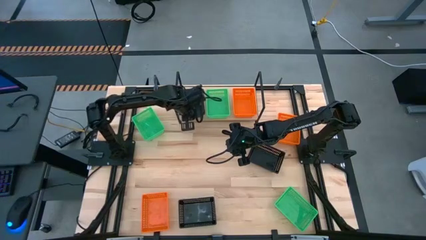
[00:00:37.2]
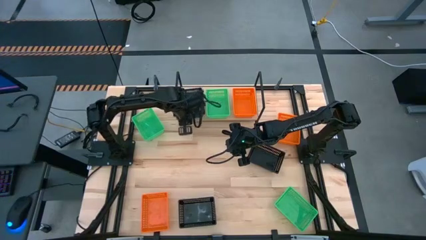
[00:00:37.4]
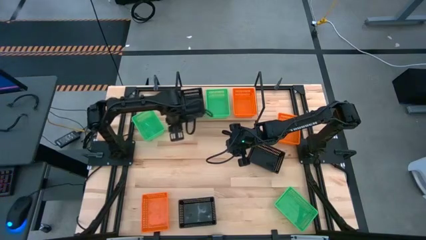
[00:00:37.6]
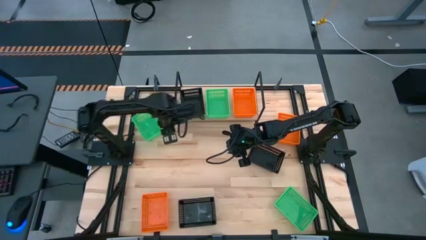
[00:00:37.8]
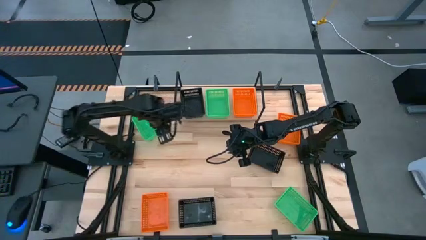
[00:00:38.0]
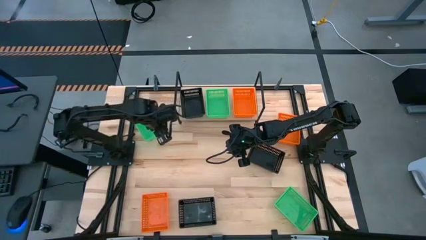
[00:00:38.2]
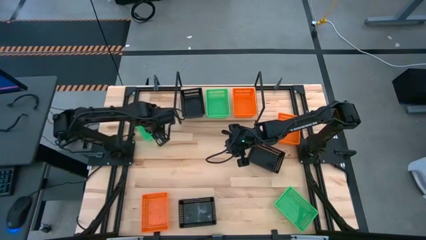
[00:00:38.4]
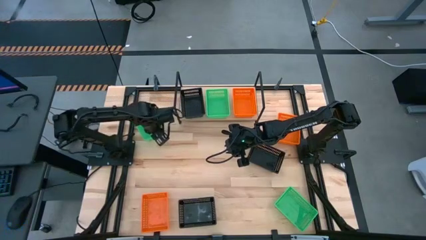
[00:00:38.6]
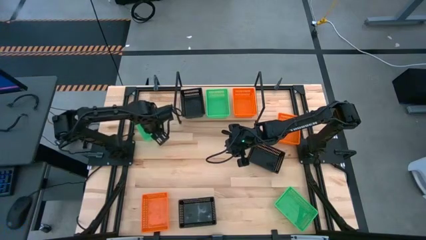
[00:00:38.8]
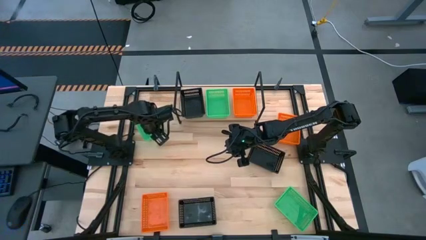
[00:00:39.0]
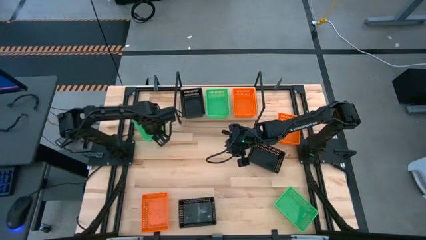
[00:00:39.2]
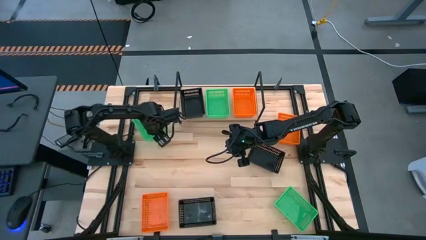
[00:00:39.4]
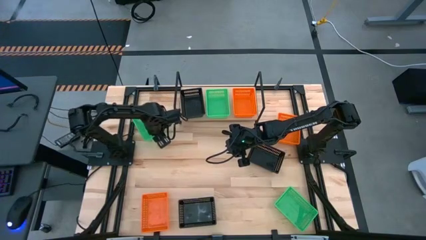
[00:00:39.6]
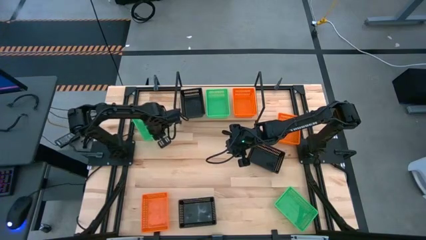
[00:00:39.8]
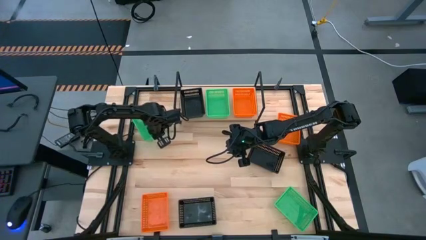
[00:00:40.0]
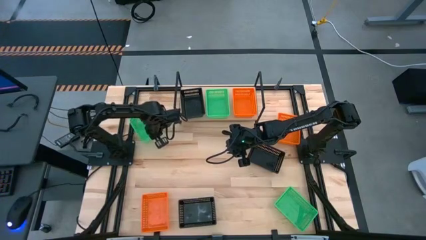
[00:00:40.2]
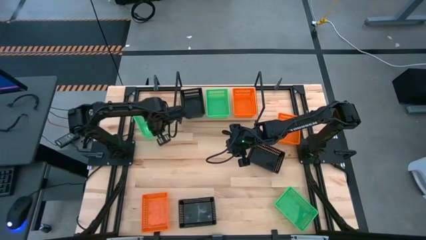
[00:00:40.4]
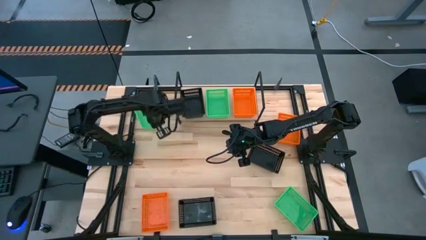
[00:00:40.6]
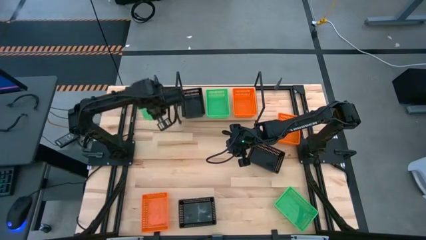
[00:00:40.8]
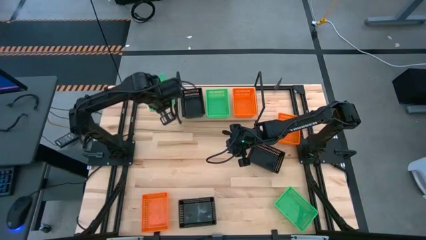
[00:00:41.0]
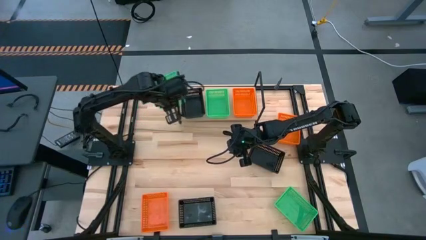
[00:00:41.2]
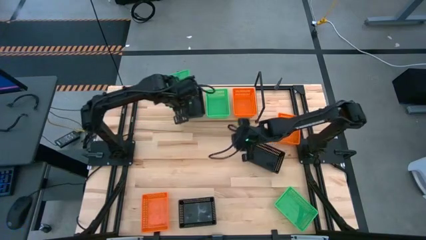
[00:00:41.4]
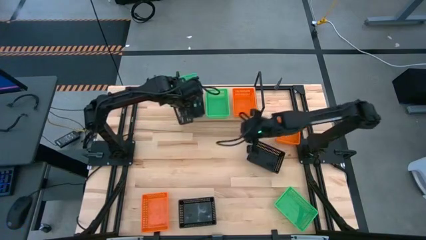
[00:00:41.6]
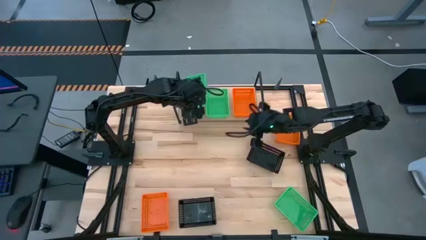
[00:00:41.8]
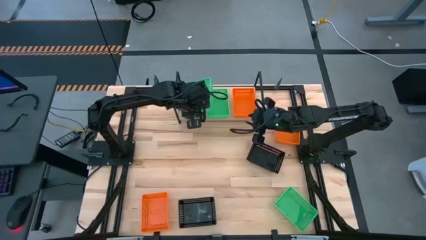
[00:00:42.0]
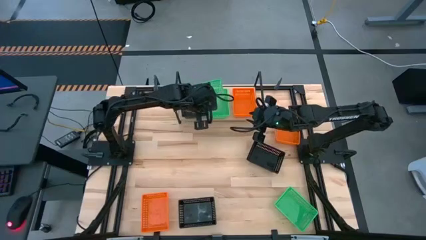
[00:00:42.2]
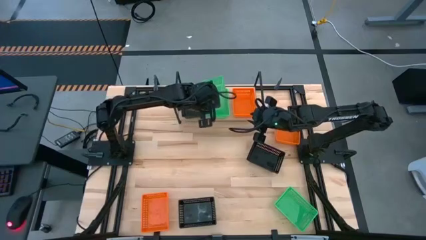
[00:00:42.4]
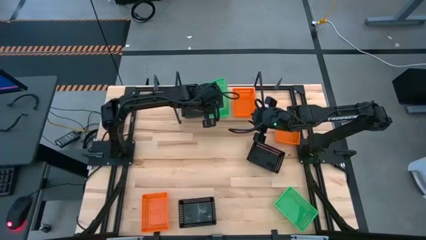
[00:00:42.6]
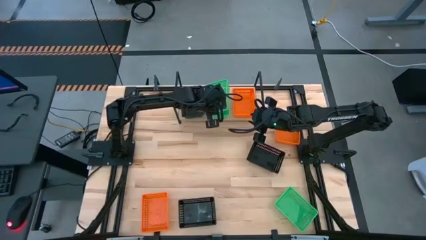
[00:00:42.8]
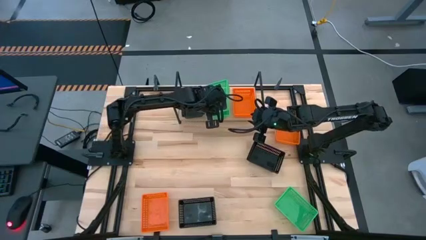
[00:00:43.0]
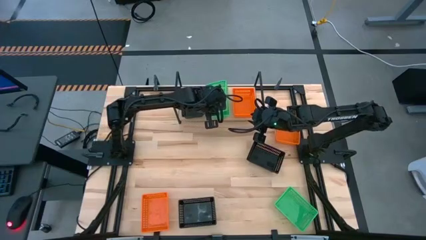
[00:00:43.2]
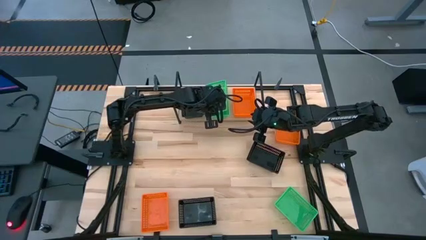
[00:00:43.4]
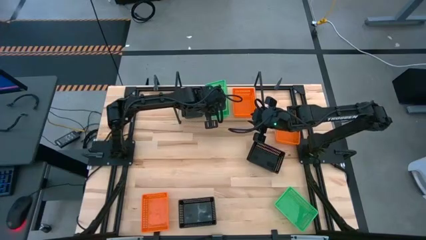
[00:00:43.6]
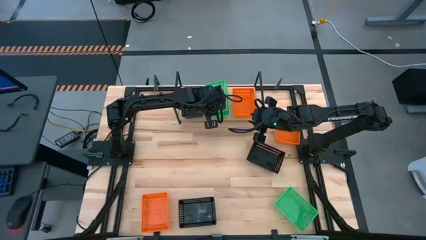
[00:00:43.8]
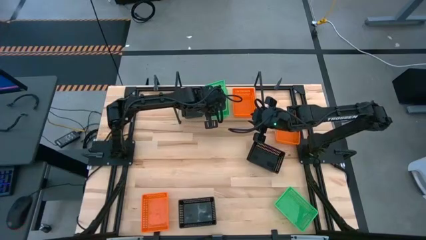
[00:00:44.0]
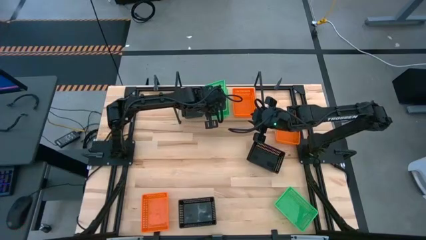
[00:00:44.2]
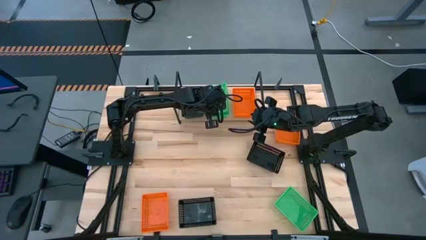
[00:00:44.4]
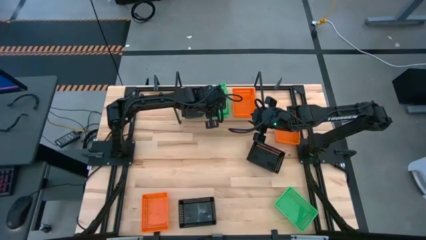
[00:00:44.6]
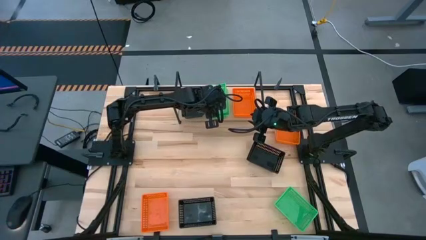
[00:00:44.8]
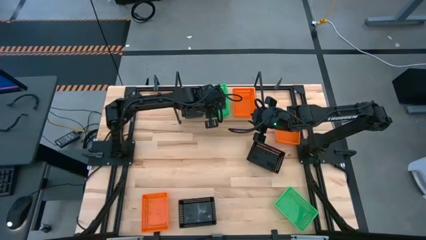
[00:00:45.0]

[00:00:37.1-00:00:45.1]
Task: Stack baskets on shelf by color
Stack the top green bin on the green bin on the shelf

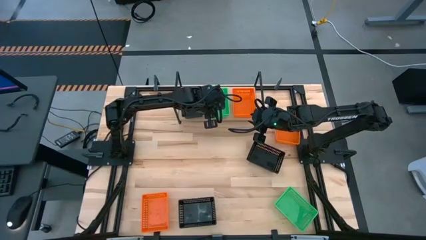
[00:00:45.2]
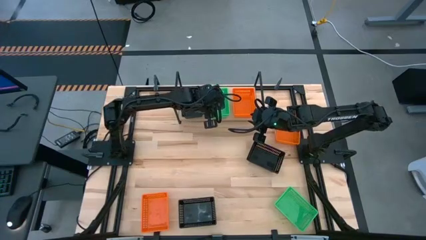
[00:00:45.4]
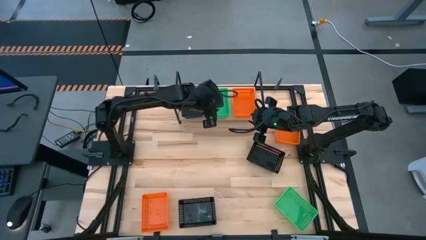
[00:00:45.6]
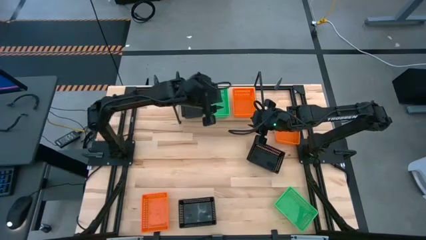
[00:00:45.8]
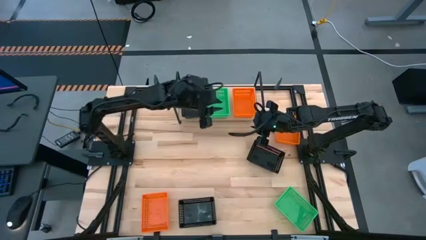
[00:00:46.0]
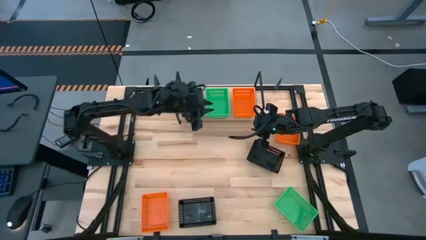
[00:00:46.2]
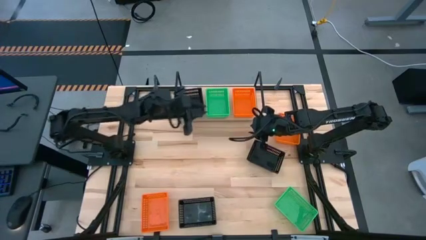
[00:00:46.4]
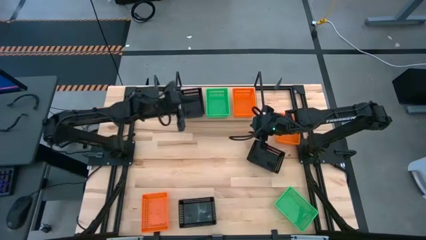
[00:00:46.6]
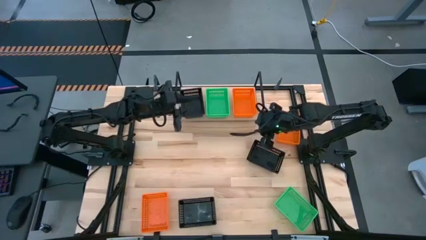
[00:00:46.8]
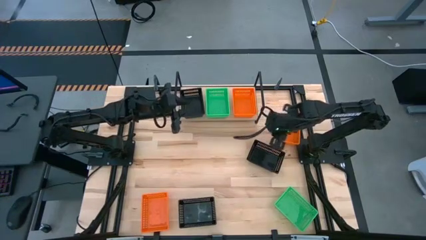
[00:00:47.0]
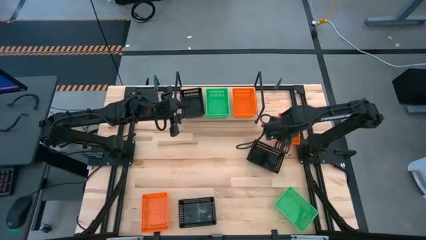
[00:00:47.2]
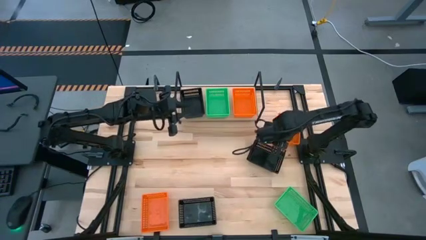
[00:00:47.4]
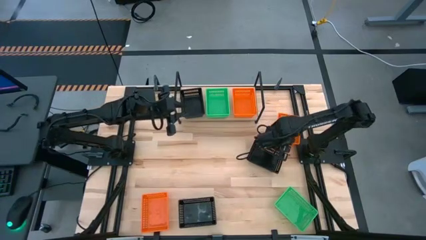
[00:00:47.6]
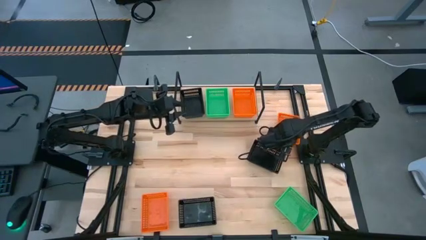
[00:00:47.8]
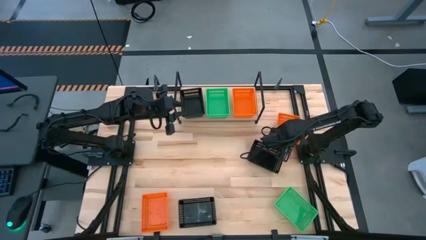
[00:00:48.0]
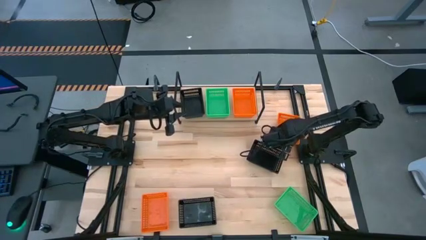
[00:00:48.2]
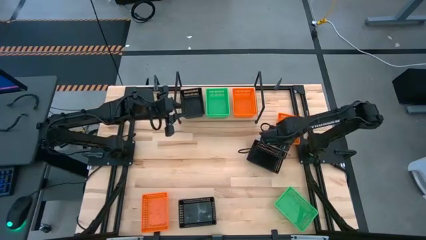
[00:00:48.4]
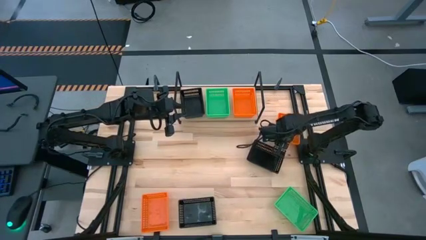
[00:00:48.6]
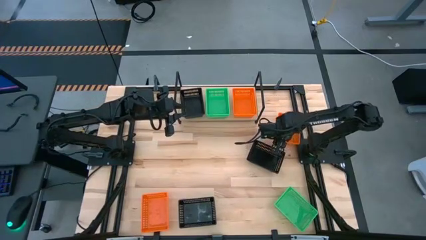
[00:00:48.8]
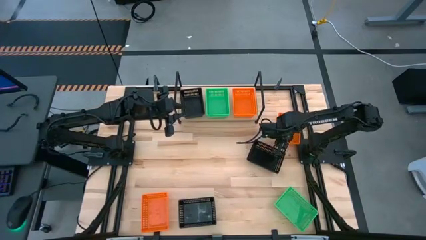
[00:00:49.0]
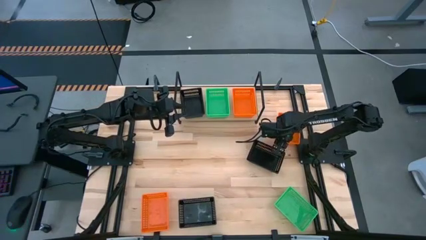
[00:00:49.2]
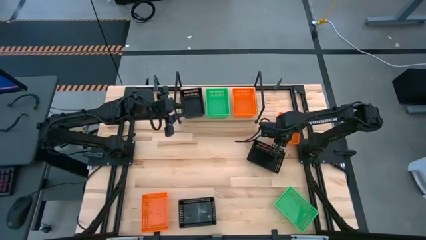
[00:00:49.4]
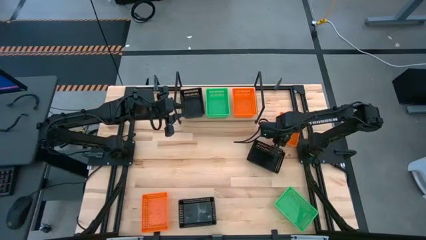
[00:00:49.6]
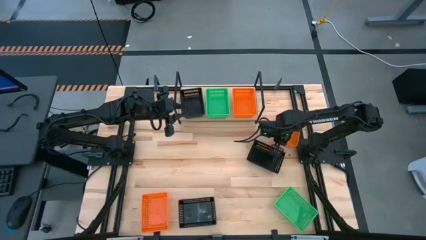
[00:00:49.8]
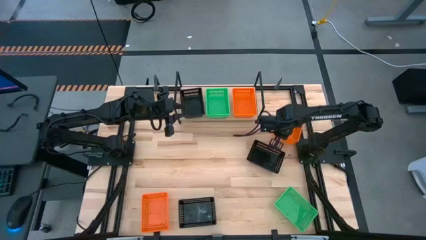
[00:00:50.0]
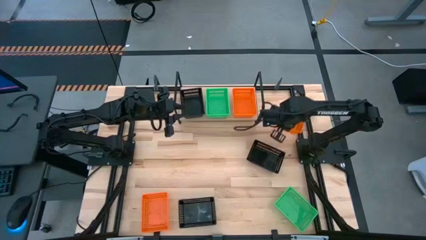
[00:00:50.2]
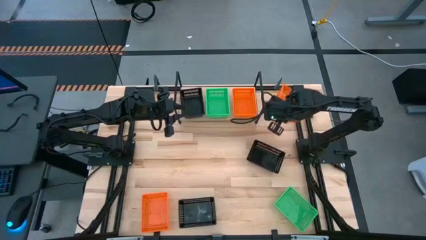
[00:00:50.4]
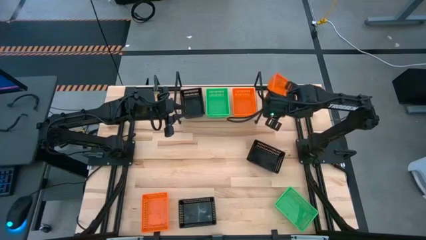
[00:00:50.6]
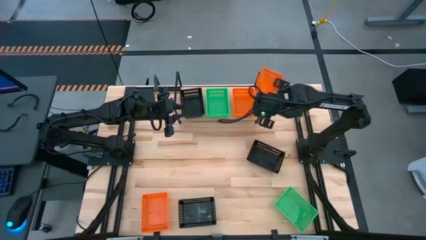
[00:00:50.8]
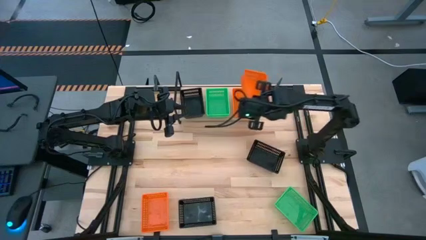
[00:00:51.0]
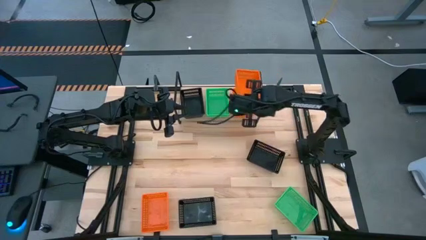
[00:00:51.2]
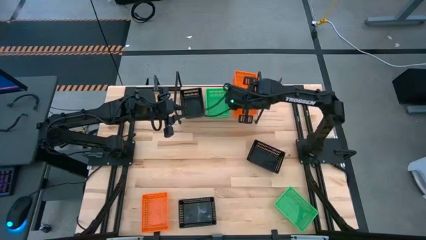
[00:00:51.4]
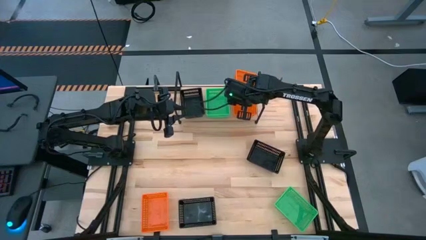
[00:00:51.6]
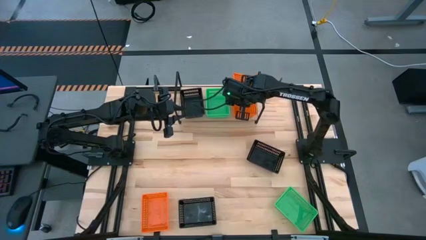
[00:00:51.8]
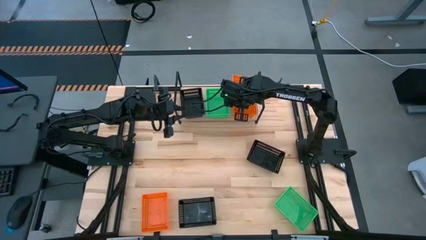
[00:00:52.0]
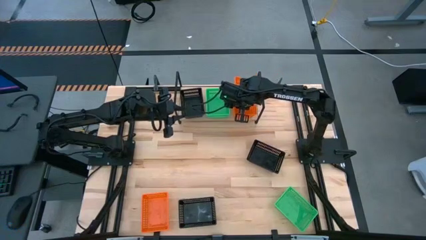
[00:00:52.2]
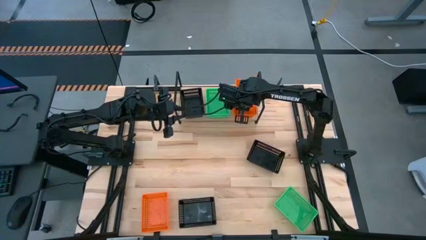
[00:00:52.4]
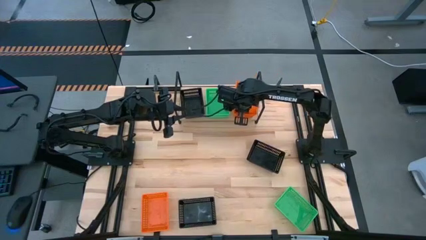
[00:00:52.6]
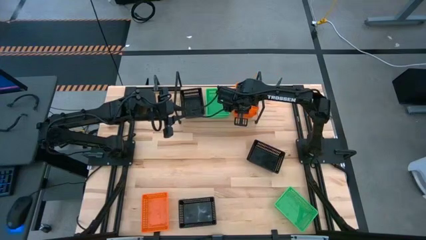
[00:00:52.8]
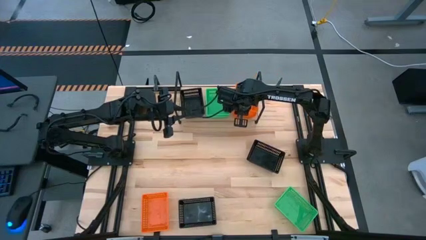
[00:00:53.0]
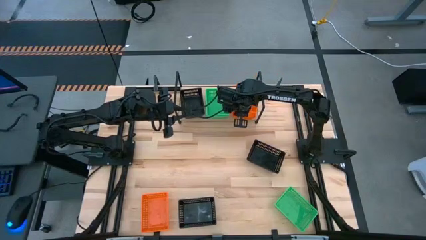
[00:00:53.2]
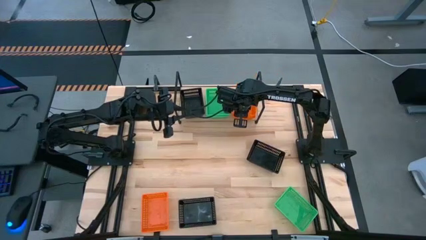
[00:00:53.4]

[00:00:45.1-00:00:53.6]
Stack the top orange bin on the orange bin on the shelf
